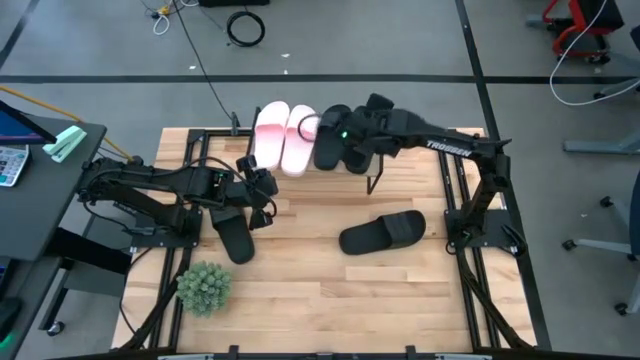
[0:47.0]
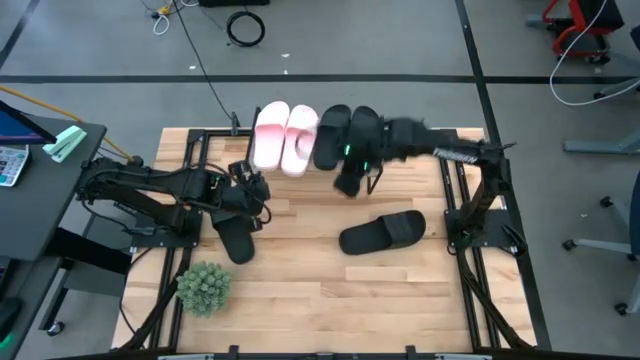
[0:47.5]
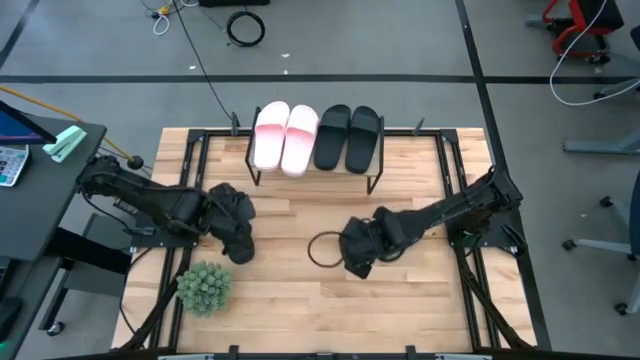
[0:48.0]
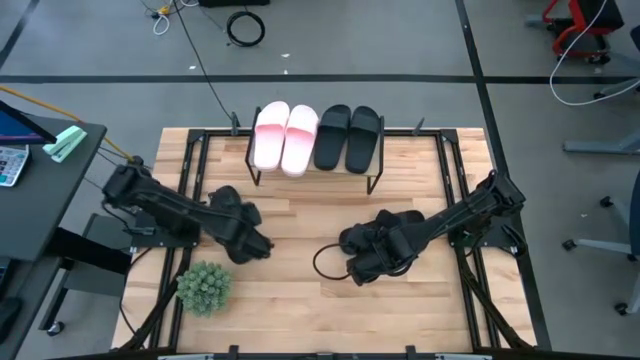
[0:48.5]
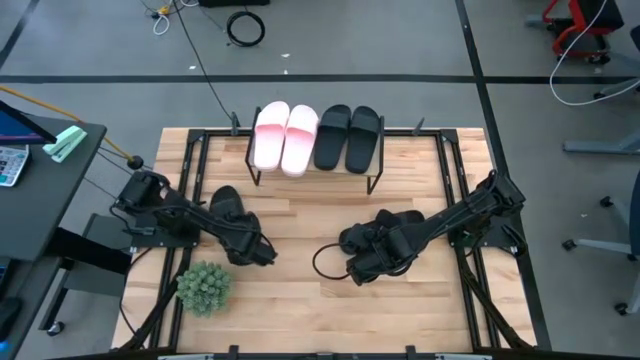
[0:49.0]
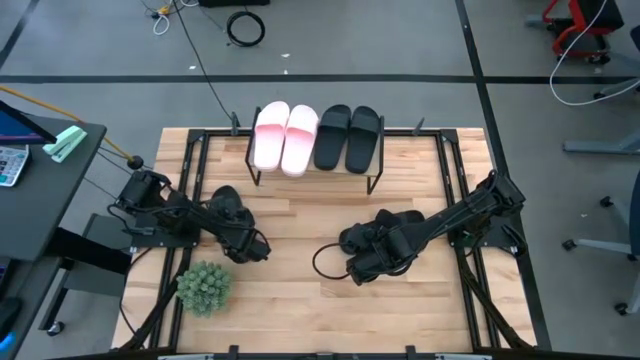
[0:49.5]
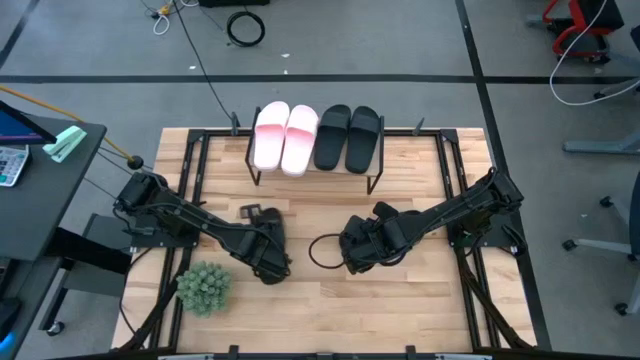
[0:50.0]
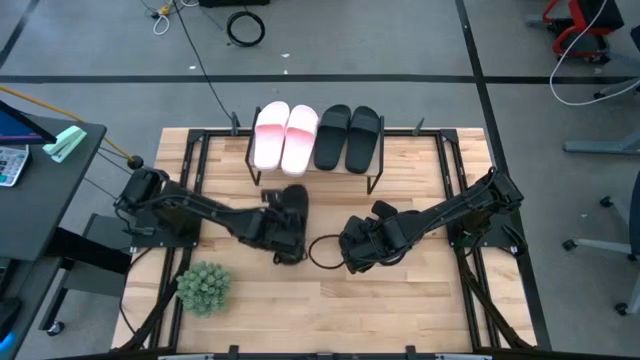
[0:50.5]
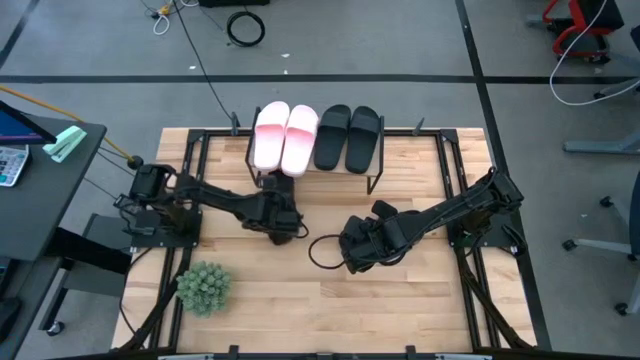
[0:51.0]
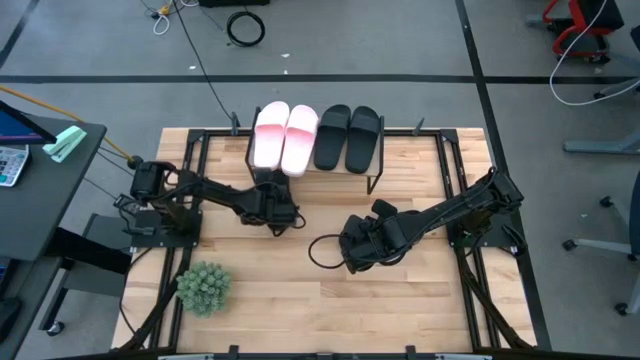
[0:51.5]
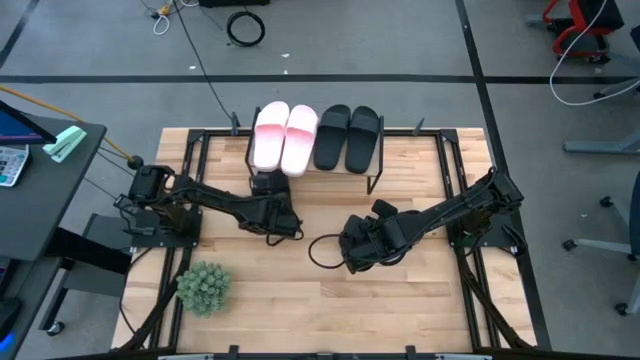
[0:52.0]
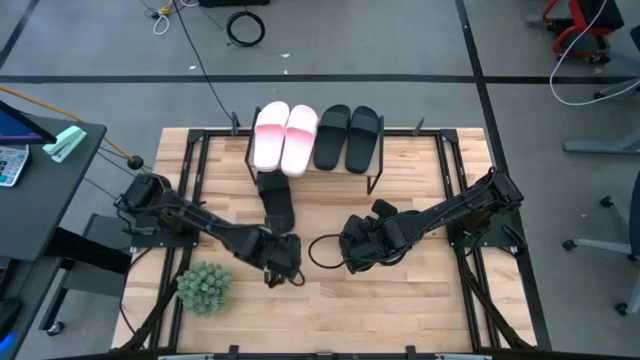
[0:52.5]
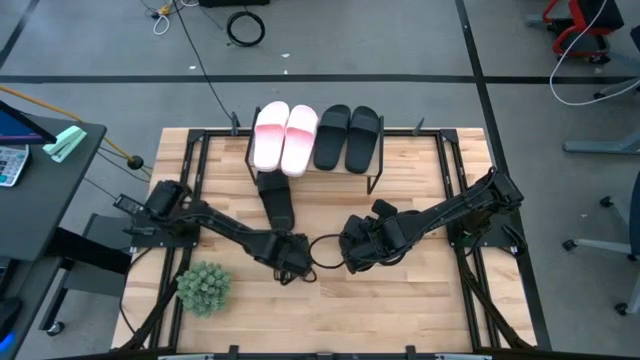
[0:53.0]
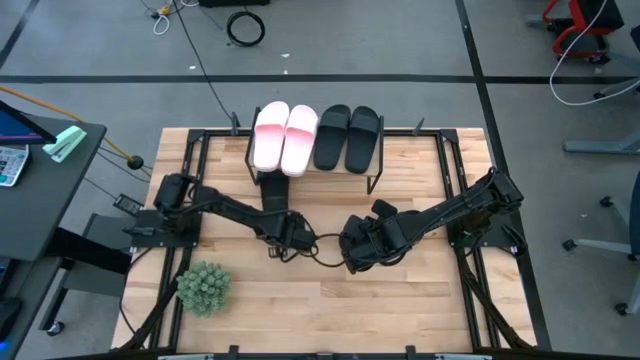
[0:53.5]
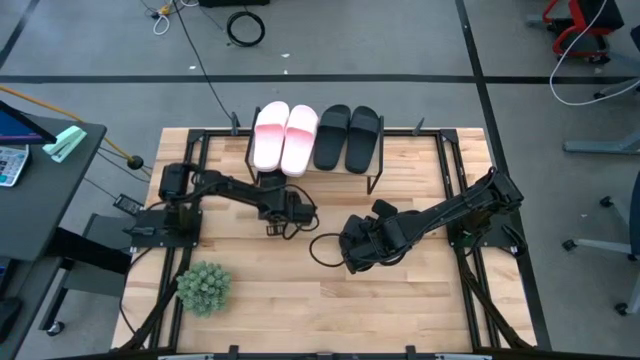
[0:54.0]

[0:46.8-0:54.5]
Task: Pick and place slides into the shelf
Put the black slides under the shelf

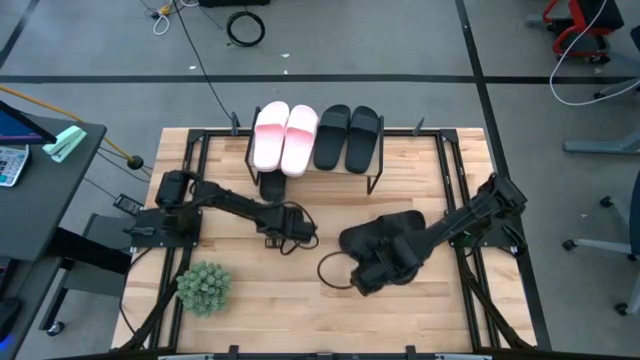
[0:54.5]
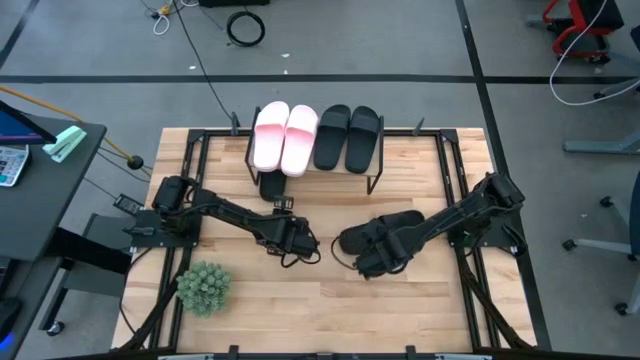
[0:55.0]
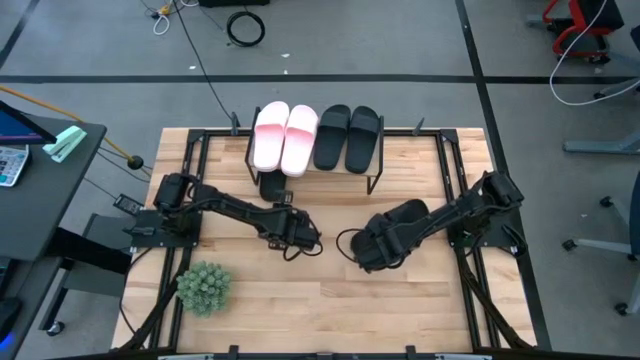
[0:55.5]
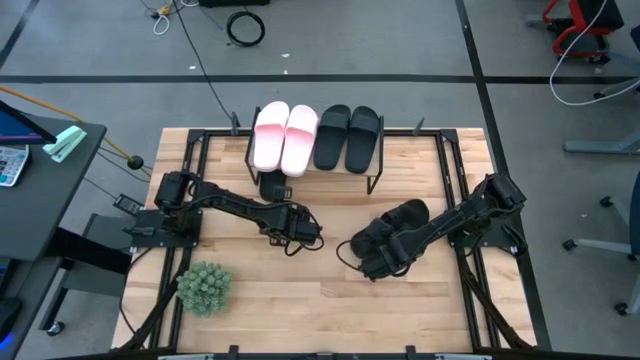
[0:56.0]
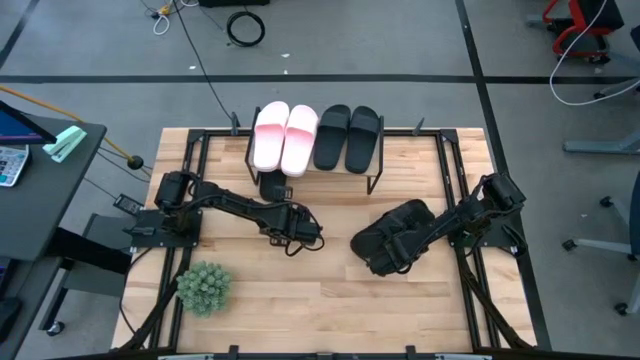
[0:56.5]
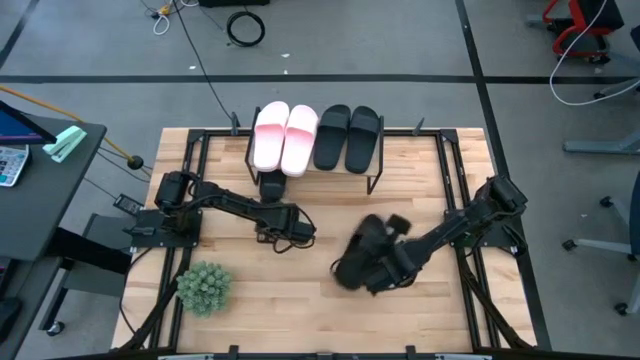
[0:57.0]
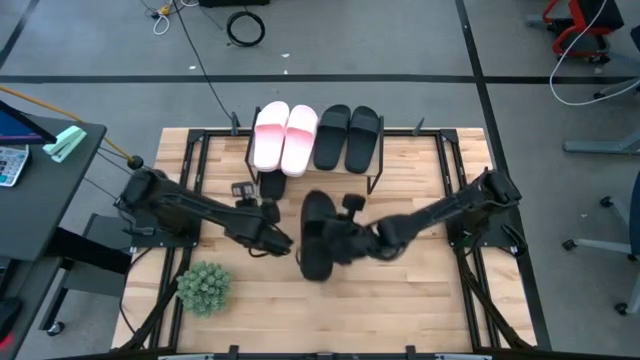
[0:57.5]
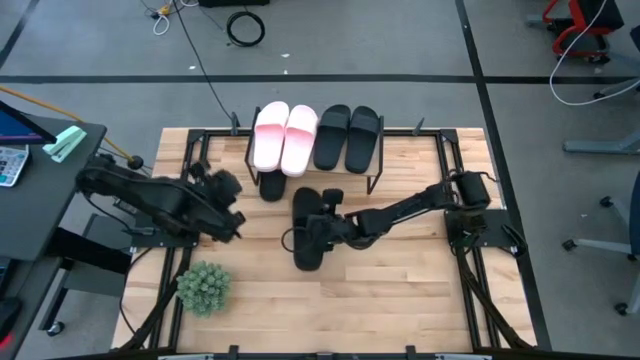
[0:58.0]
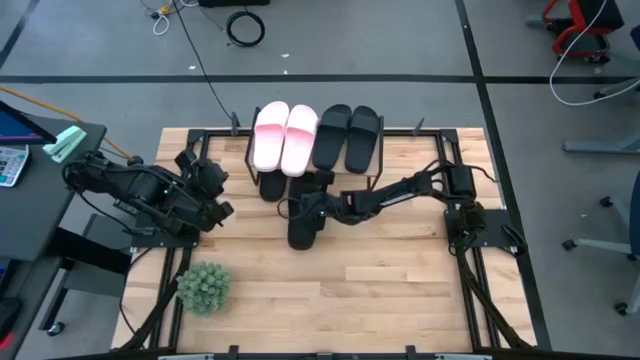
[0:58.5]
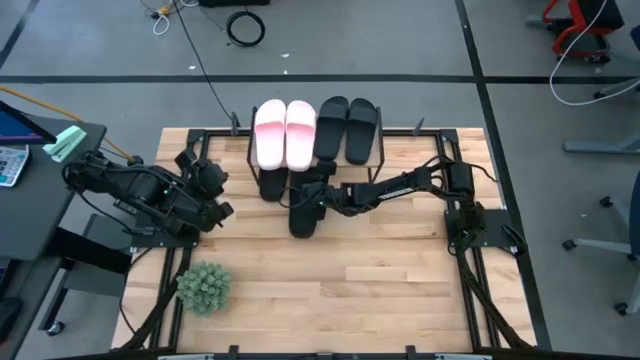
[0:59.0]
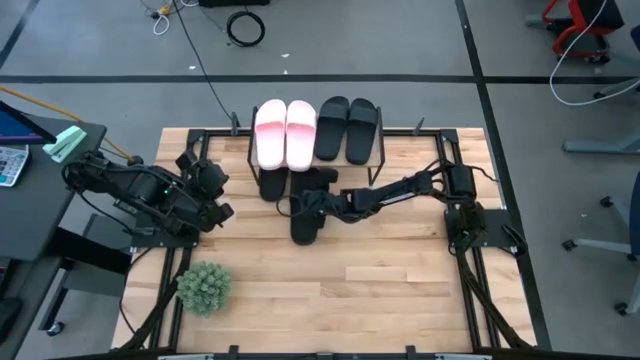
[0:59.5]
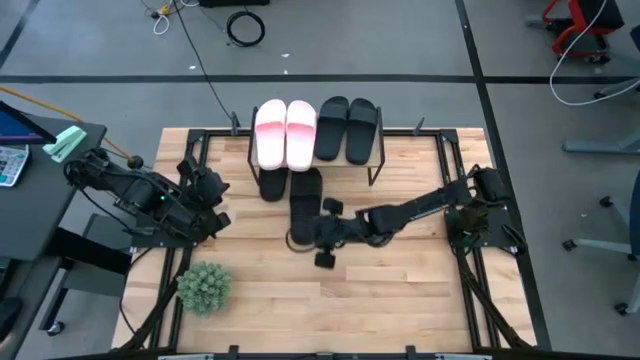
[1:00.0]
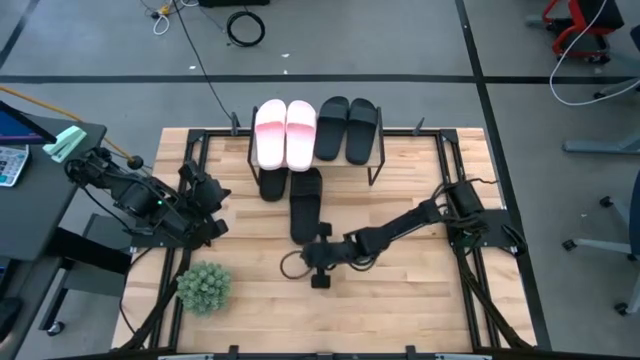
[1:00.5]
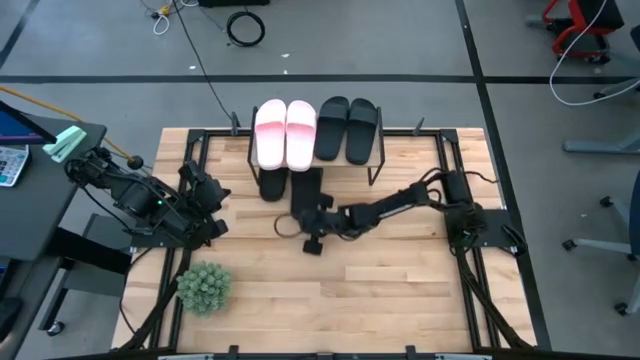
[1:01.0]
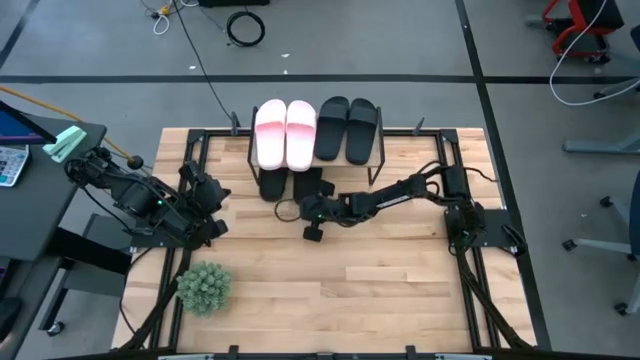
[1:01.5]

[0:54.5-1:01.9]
Put the black slides under the shelf

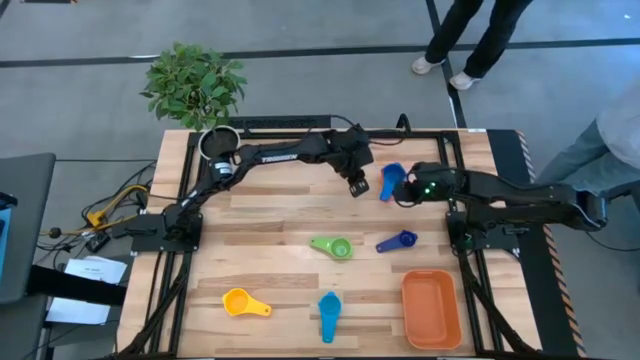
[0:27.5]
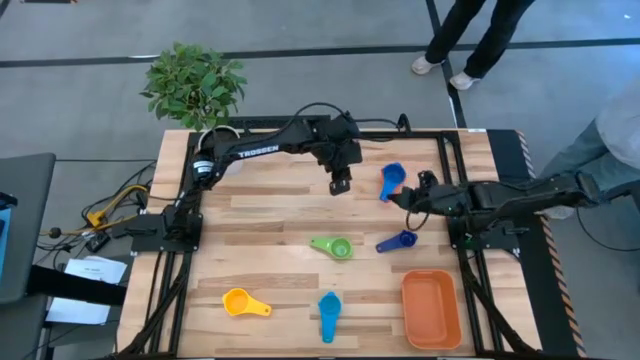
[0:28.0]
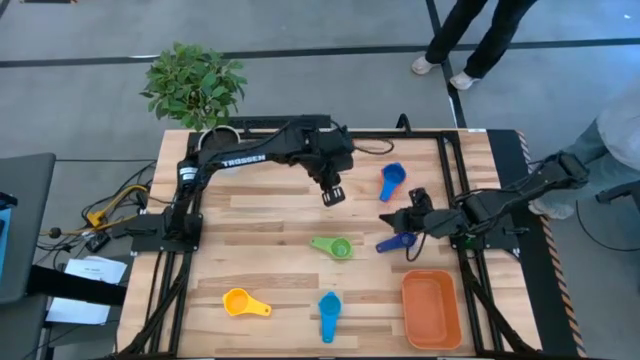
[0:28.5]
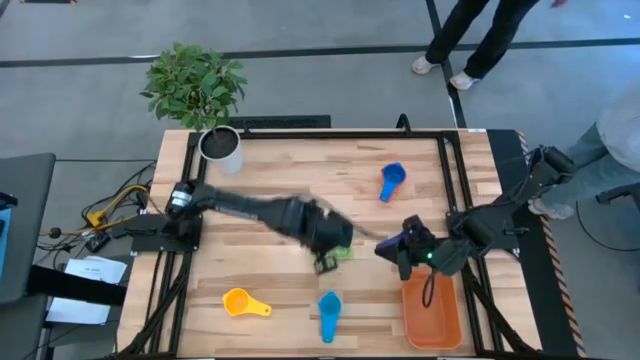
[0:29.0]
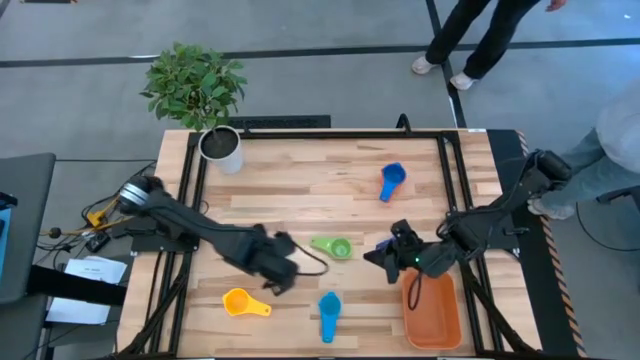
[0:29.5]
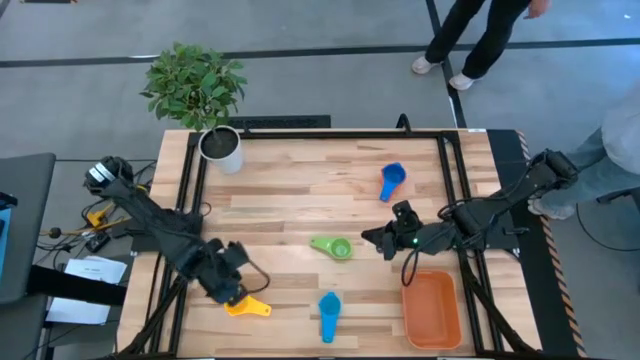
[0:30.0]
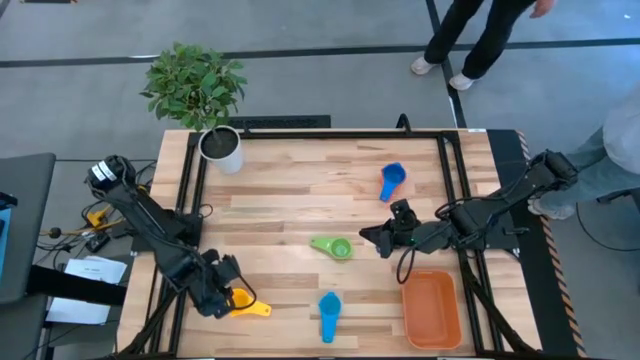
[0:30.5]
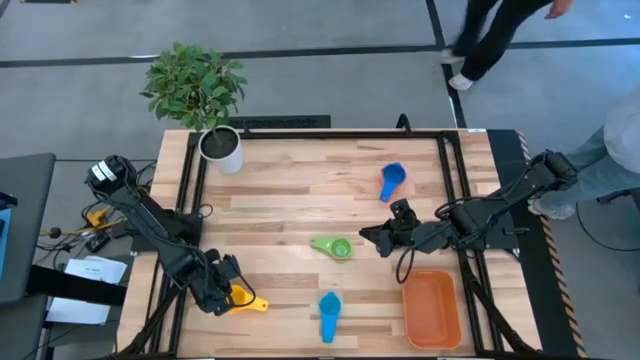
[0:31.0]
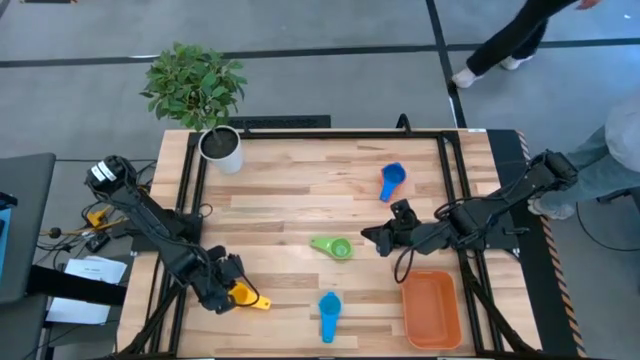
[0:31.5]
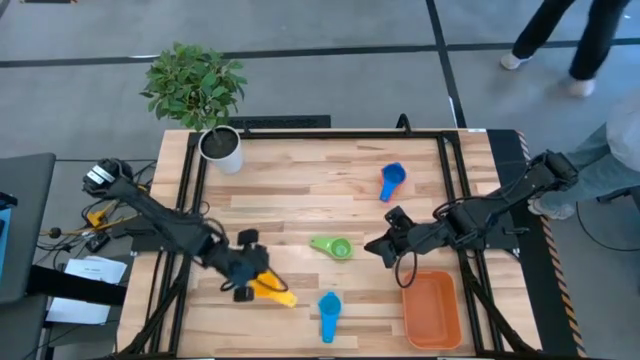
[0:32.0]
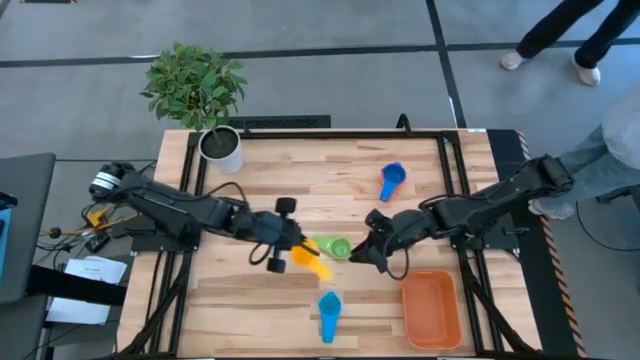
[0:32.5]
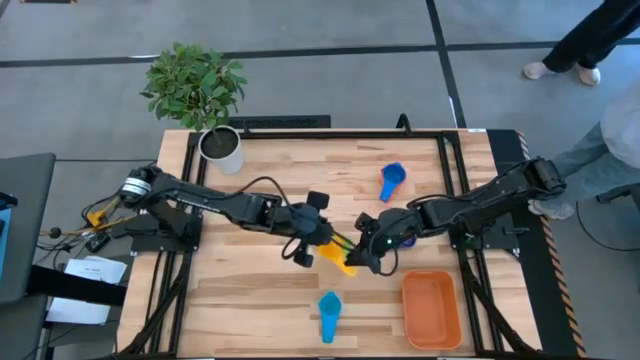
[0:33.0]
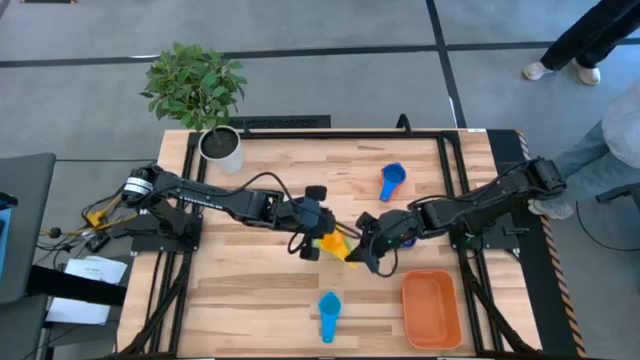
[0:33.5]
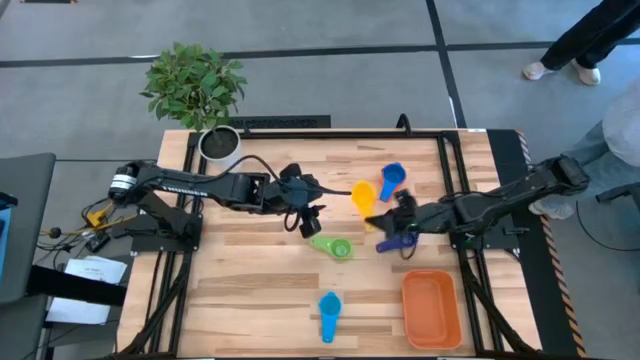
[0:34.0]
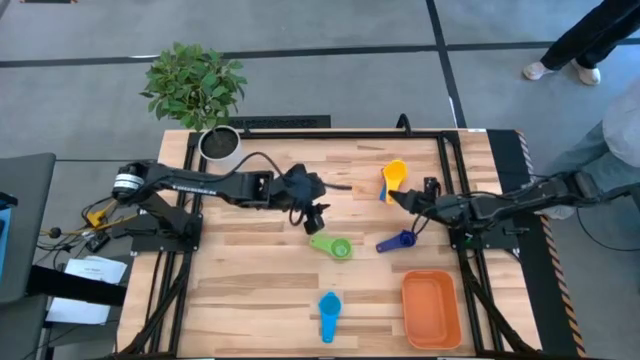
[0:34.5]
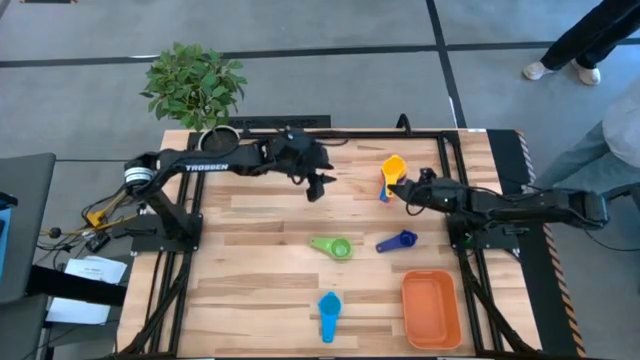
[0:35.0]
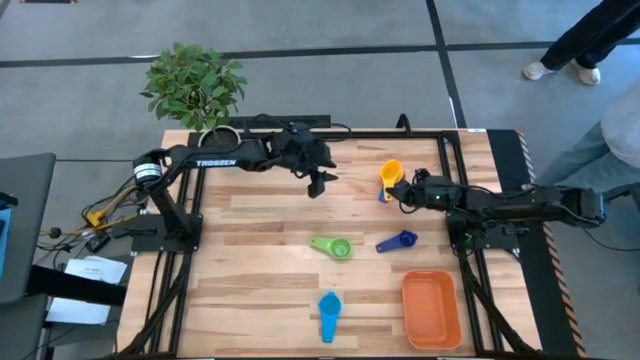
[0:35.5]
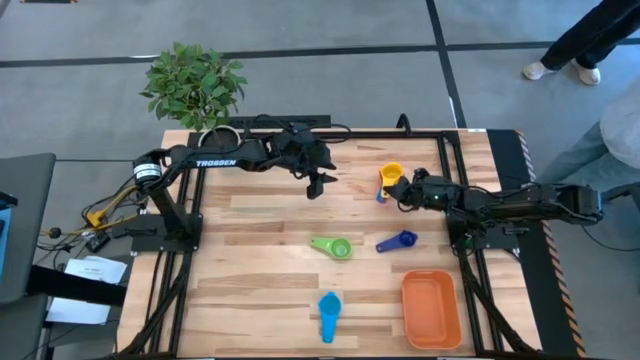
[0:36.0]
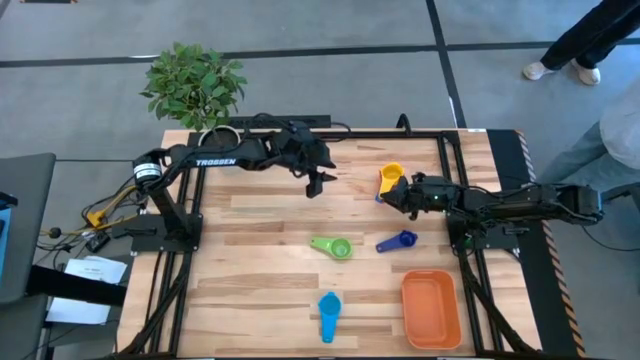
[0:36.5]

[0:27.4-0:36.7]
Task: Nest measuring cups in basket
Stack the yellow measuring cup on top of the blue measuring cup
